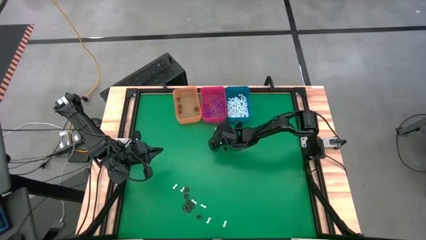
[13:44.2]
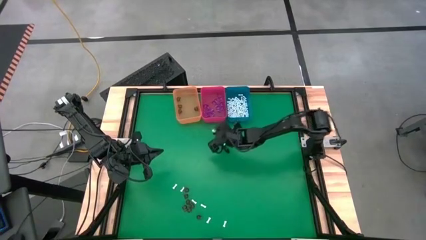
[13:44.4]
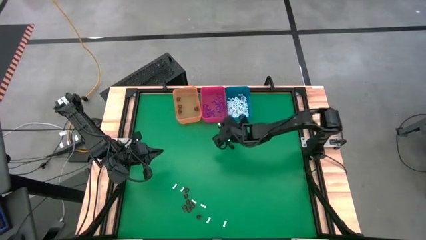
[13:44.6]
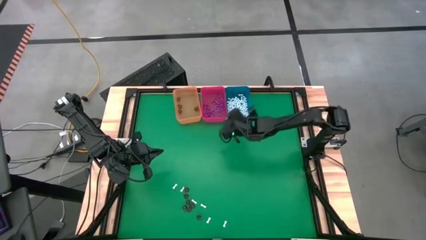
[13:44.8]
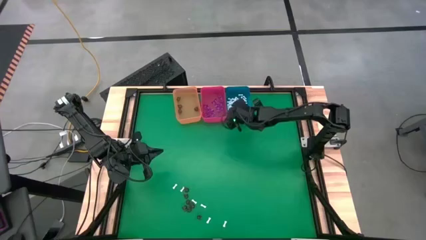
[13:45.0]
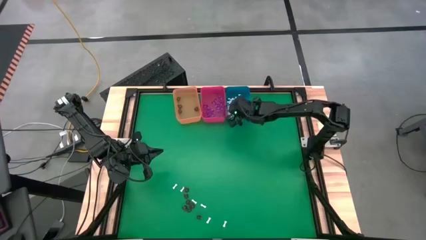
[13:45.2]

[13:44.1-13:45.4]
Task: Sort Halloween decoration
Put the white bone toy into the blue bin

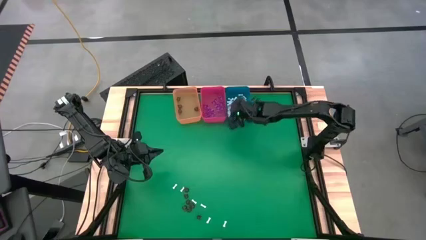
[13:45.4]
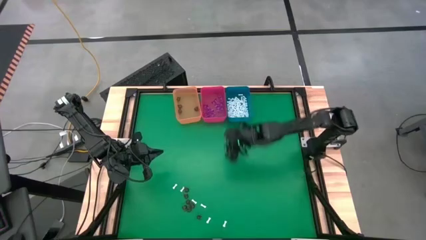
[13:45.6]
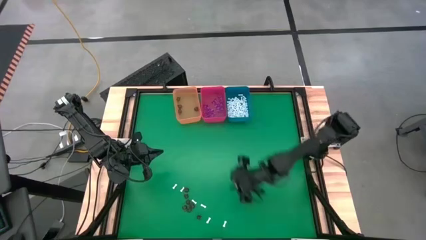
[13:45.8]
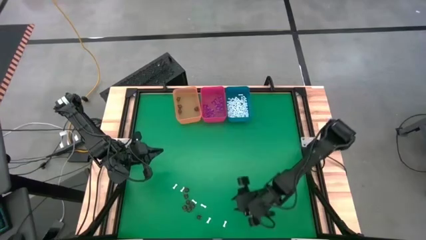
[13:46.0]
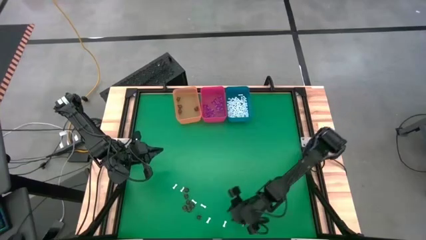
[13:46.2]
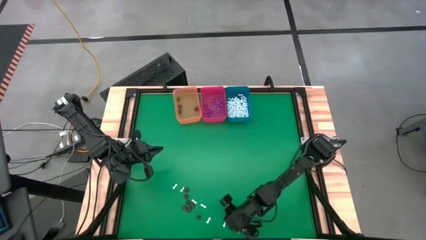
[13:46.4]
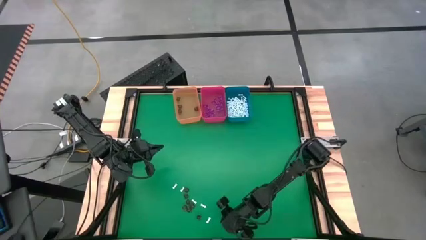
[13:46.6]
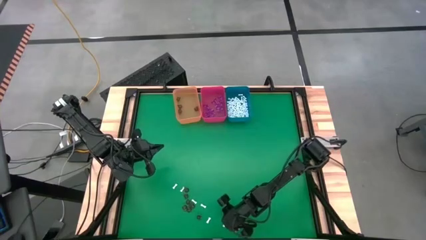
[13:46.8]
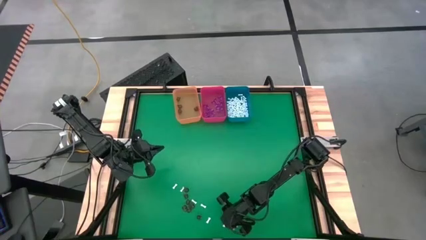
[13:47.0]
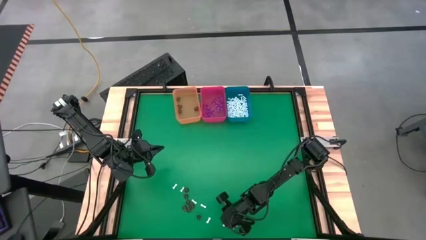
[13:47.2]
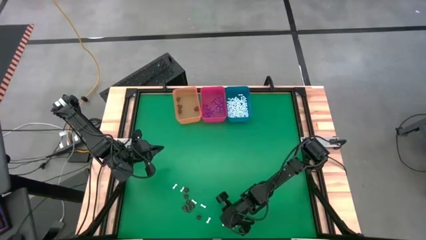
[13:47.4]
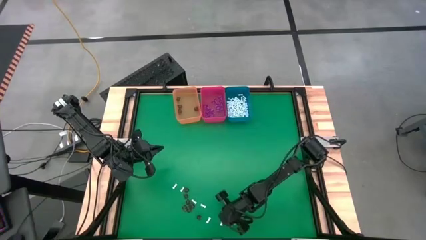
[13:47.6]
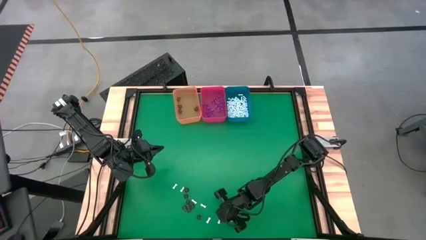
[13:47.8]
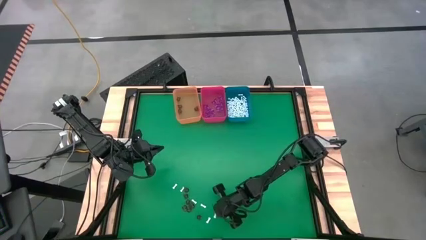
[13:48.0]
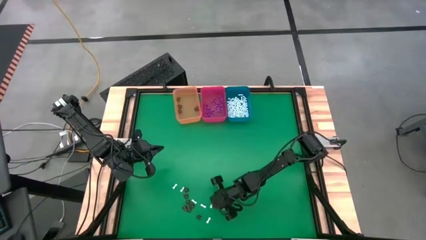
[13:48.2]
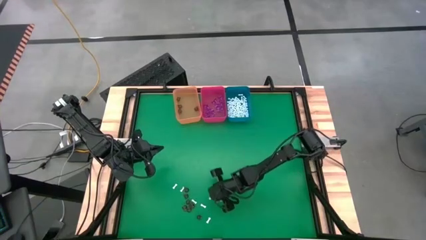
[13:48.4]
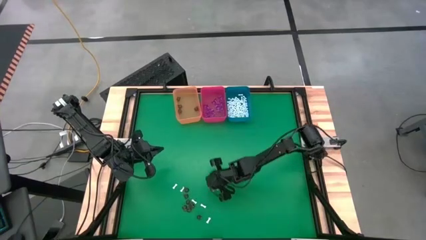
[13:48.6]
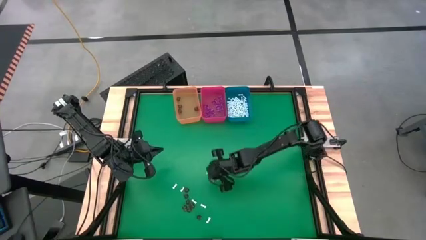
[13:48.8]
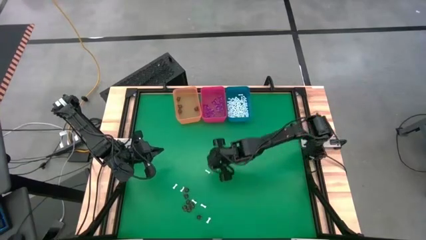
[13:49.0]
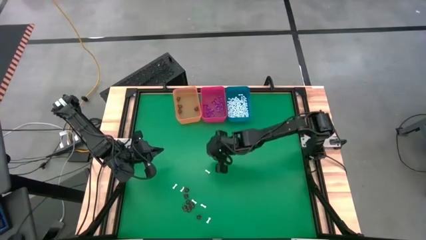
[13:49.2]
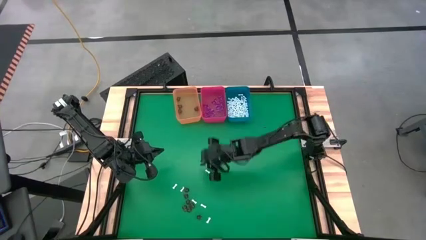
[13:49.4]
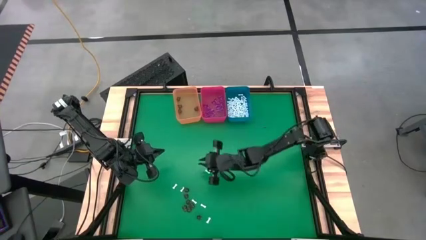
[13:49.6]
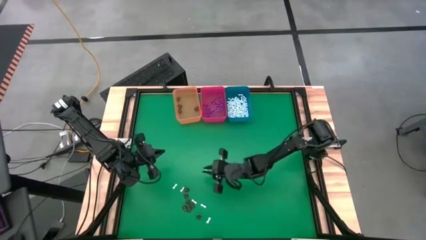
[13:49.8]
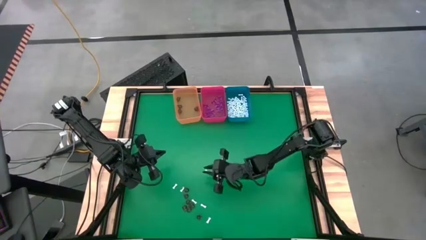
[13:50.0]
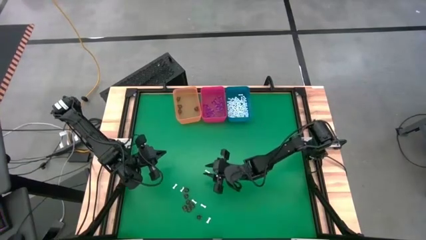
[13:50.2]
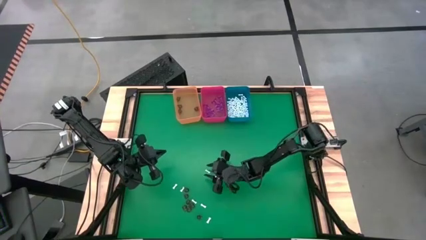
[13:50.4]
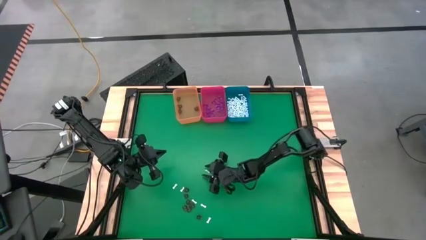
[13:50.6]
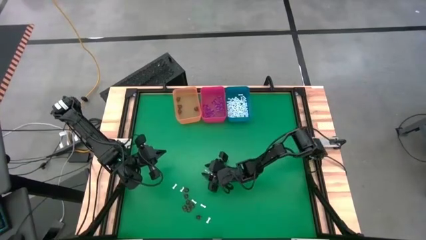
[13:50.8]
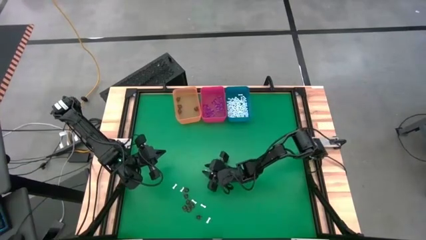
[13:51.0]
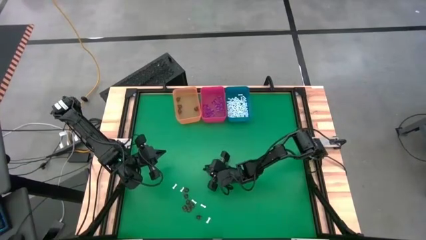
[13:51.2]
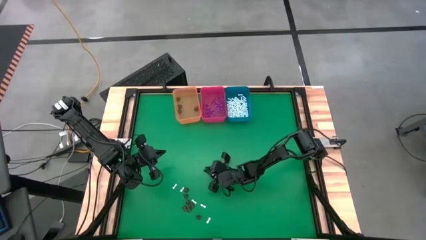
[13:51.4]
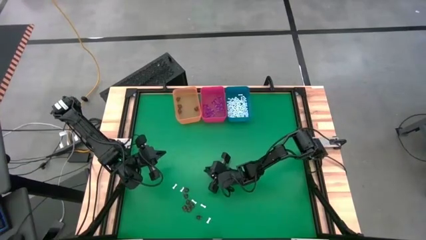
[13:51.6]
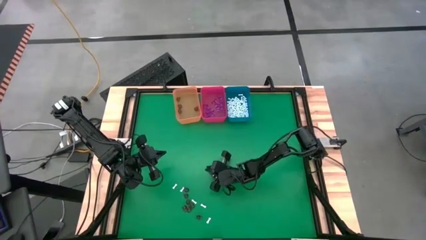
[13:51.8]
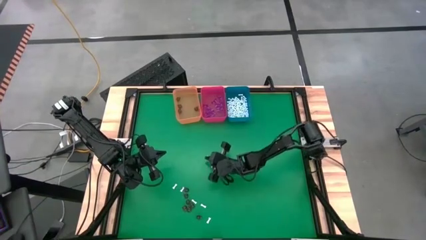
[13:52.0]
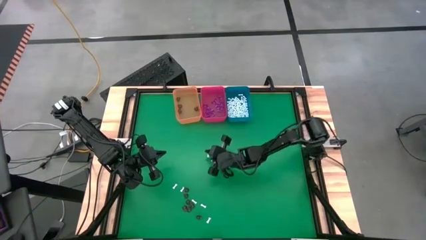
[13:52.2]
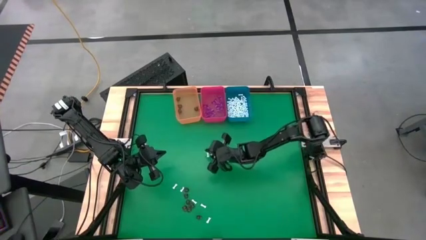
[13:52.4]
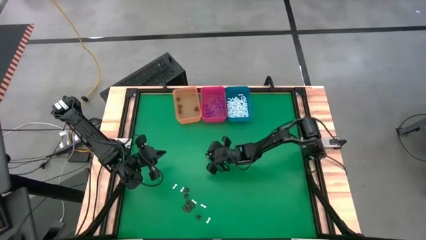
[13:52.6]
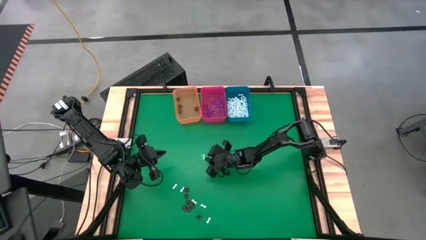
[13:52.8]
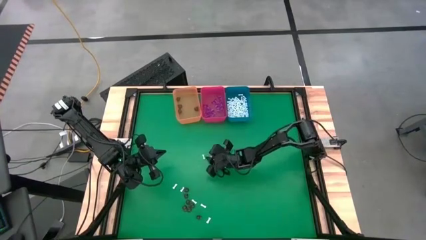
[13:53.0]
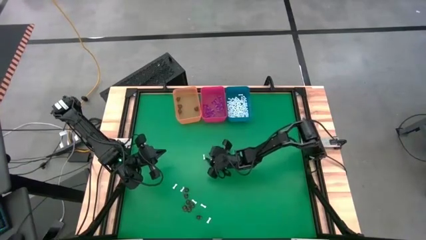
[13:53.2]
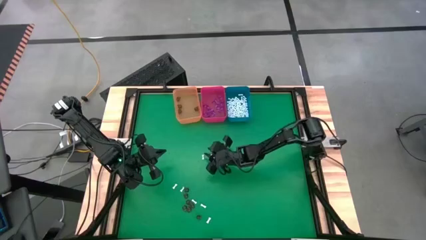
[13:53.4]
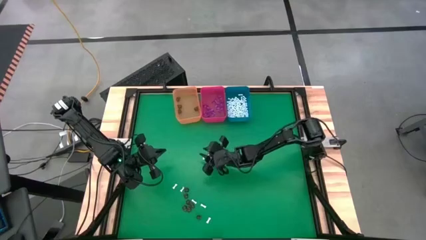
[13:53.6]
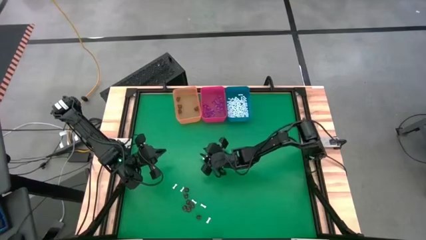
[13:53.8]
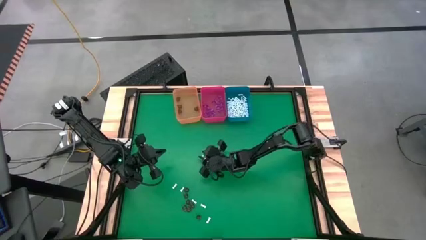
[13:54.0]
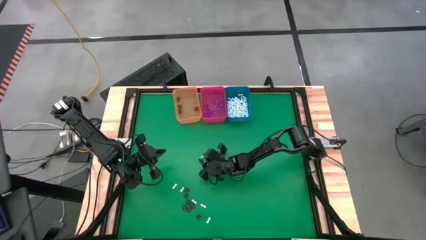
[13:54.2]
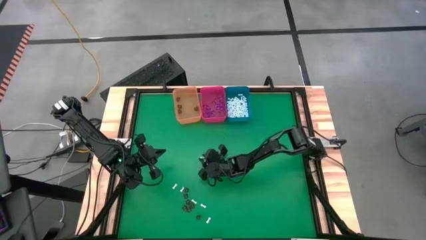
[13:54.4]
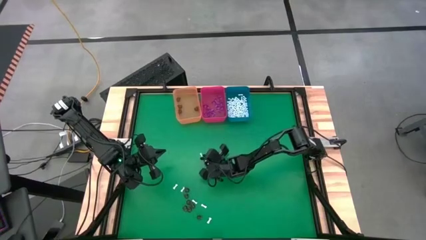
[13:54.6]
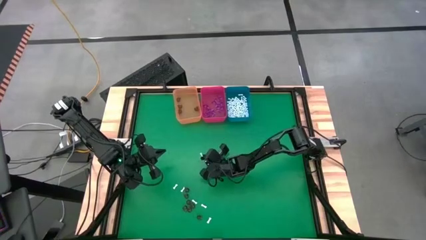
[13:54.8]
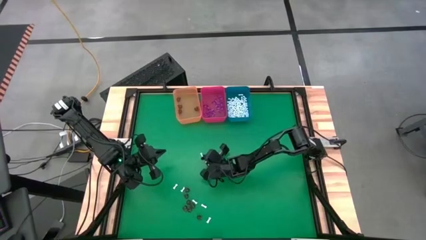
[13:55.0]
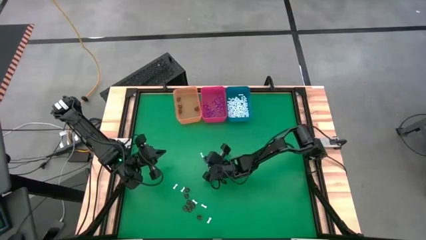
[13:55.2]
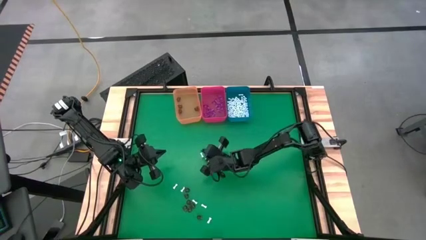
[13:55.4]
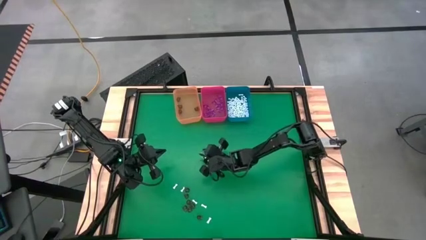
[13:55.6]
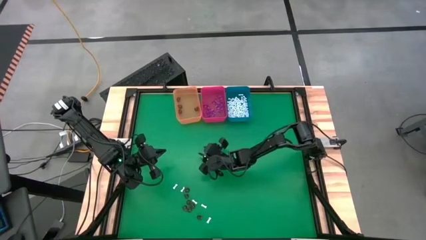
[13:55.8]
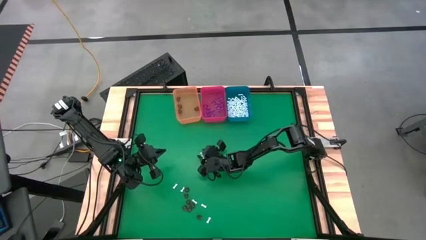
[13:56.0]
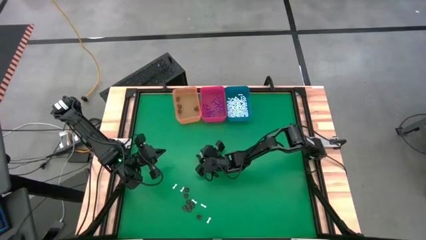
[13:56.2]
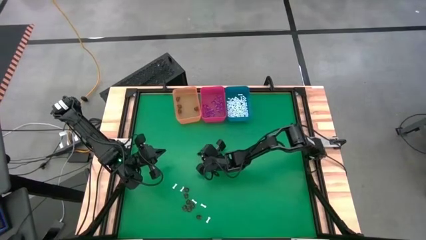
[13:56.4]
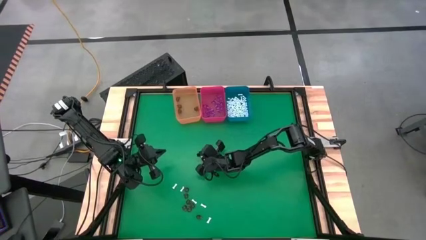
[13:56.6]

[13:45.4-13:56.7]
Put the white bone toy into the blue bin

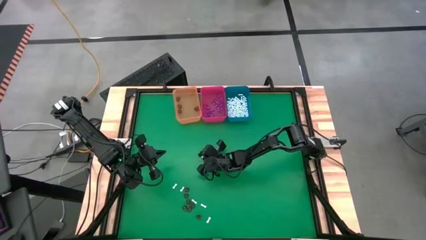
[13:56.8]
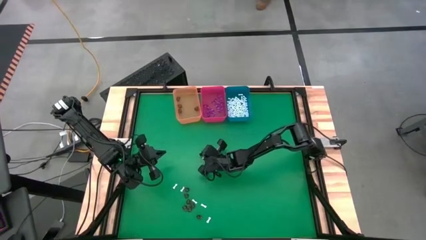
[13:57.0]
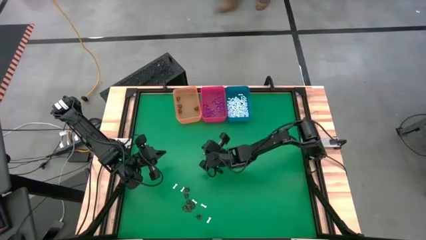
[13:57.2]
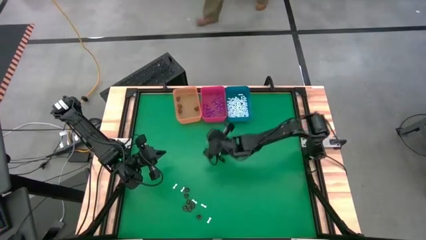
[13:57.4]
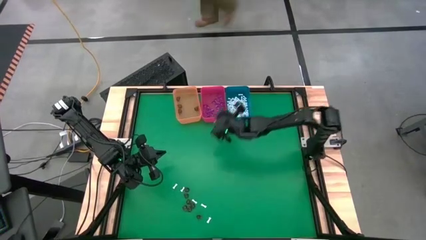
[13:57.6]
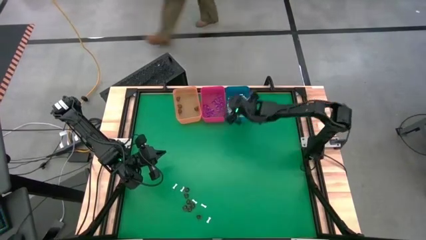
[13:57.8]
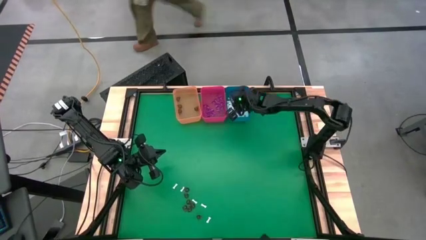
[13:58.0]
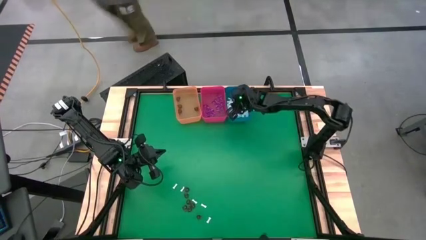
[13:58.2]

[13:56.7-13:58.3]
Put the white bone toy into the blue bin

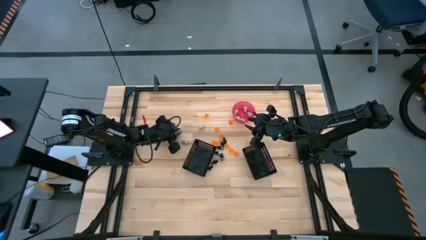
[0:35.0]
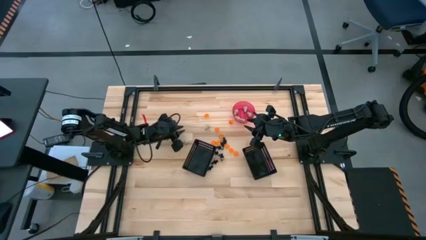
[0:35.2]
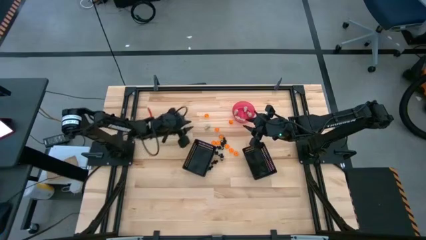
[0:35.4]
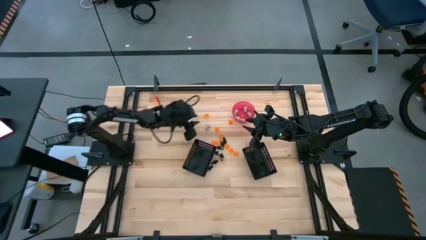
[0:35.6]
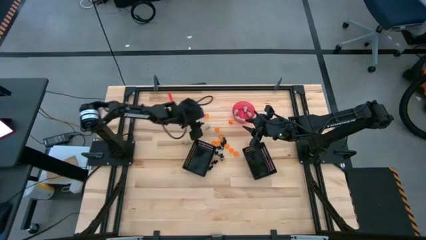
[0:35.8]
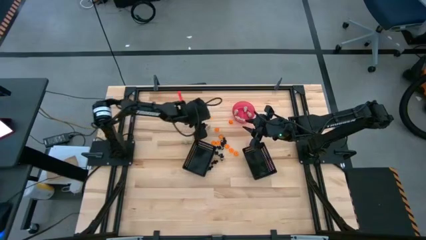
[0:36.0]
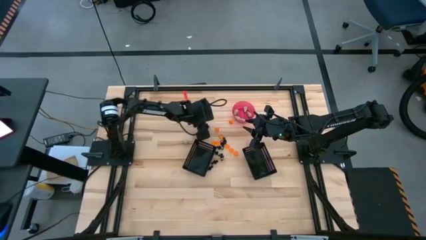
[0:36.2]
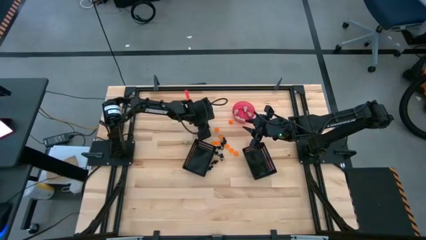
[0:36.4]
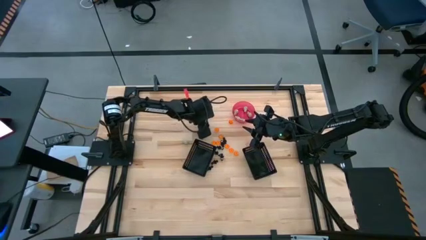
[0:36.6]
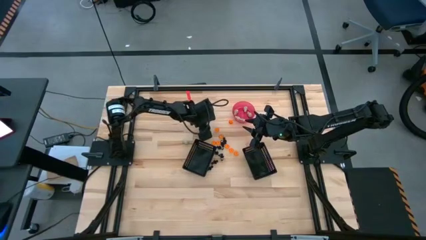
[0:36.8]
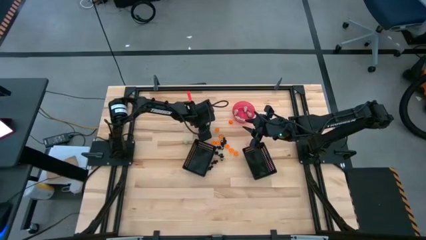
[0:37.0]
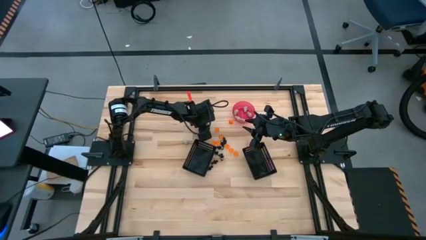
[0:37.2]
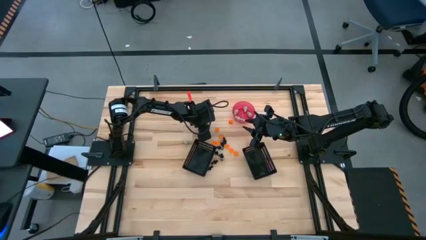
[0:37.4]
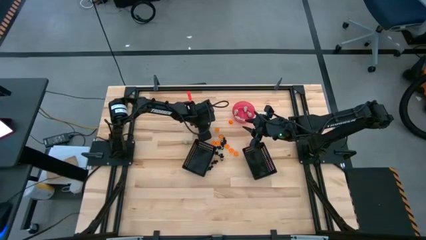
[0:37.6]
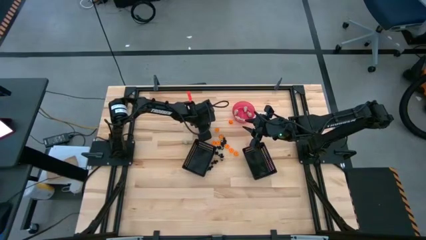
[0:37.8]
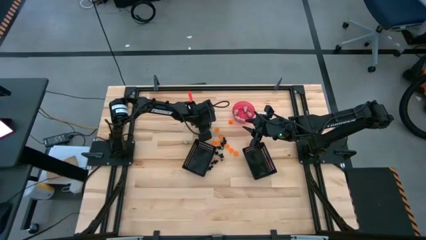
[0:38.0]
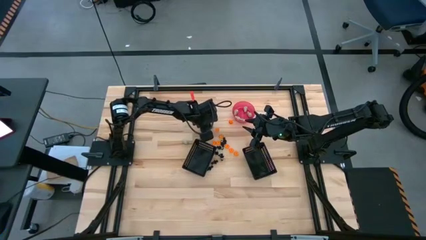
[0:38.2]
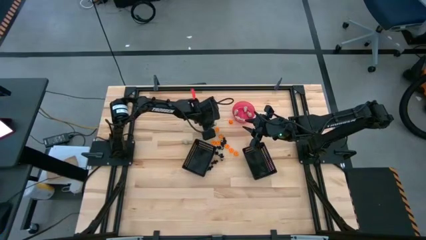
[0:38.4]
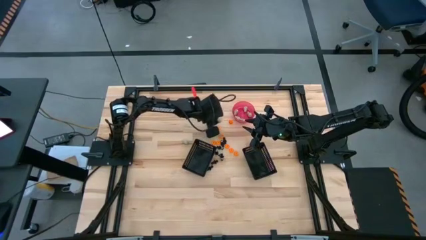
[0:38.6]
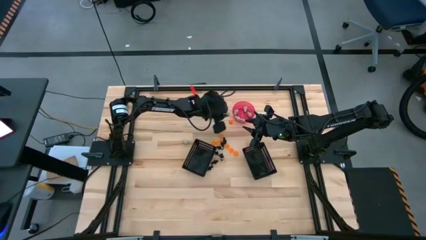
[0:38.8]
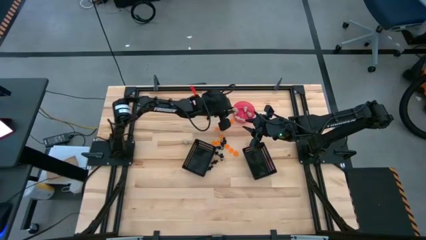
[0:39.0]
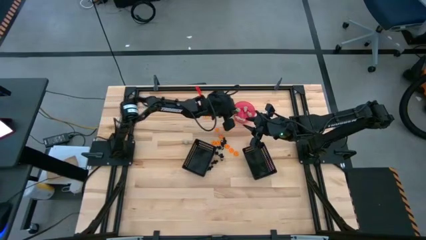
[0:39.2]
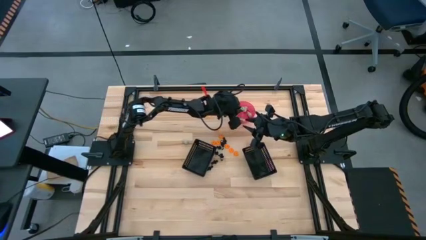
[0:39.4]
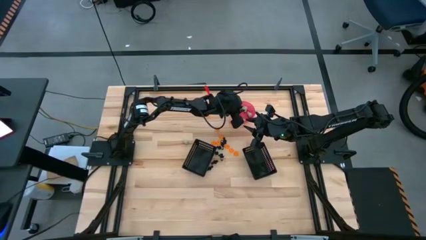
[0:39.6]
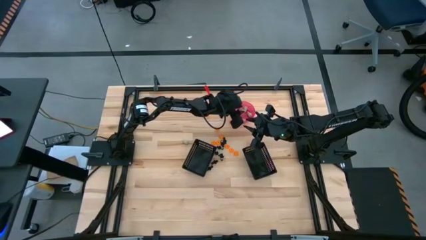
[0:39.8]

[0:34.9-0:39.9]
Task: Sort Halloween decoration
Put the white skull toy into the pink container
